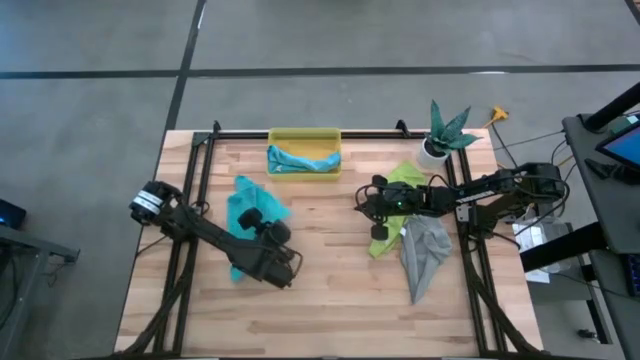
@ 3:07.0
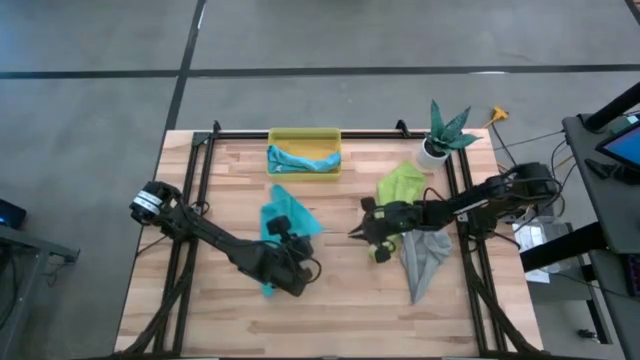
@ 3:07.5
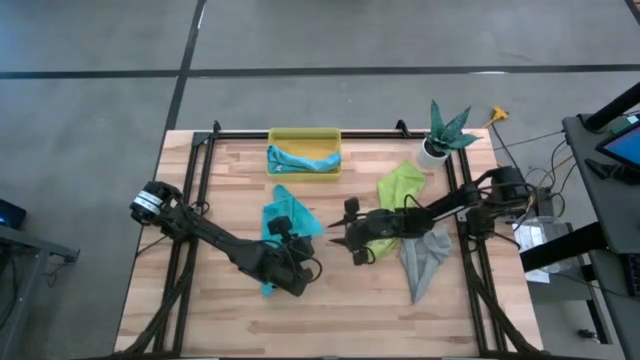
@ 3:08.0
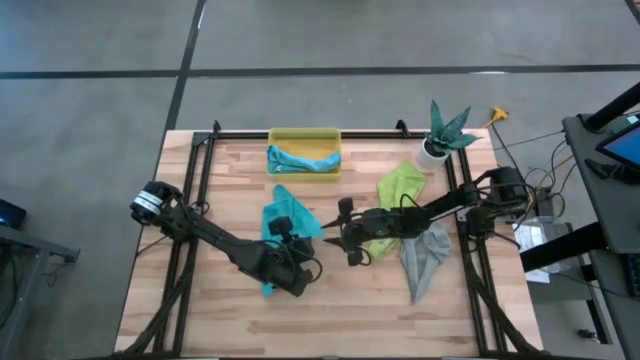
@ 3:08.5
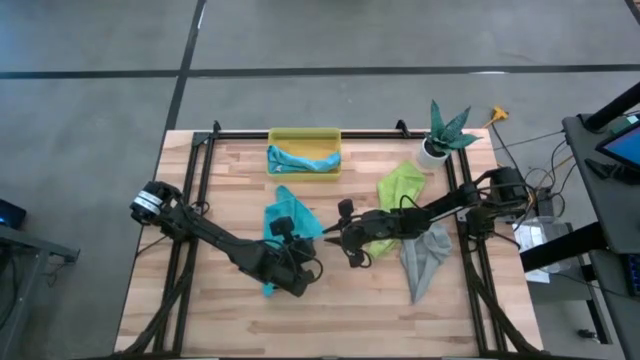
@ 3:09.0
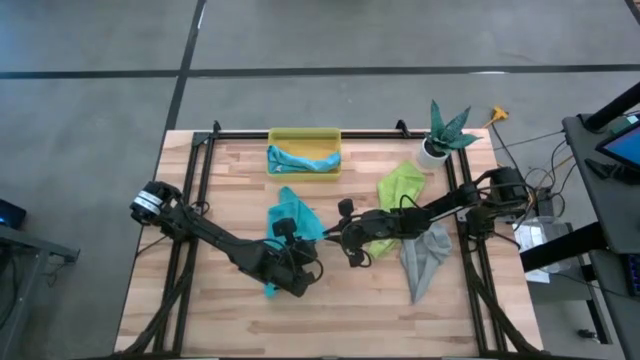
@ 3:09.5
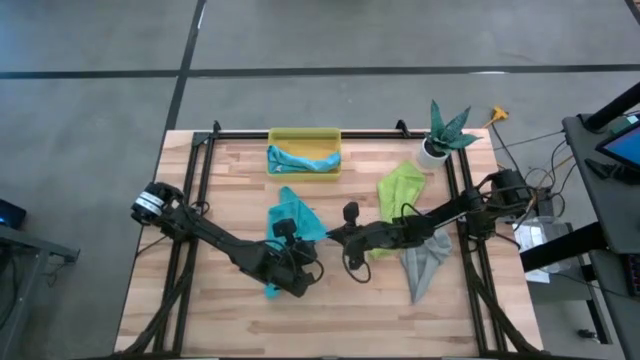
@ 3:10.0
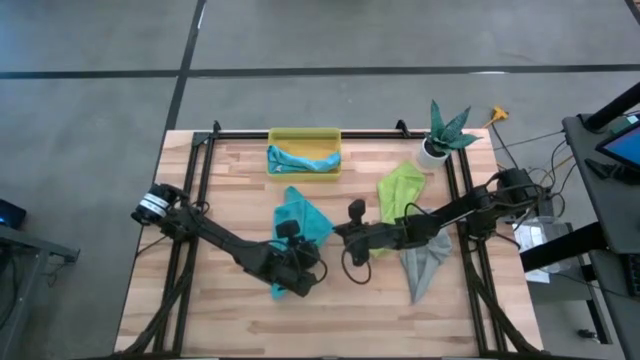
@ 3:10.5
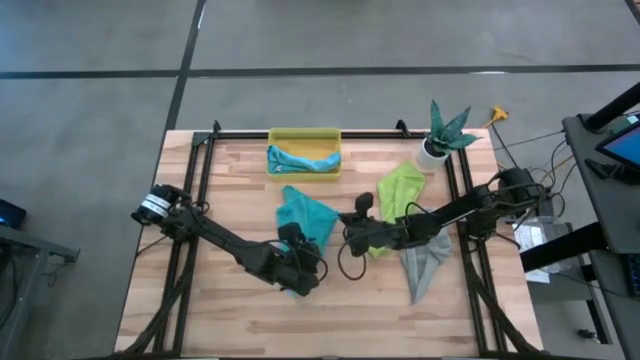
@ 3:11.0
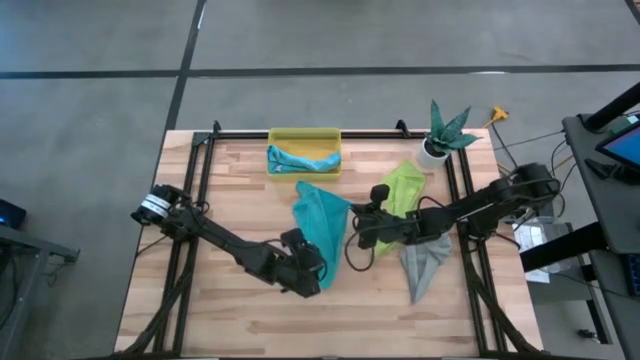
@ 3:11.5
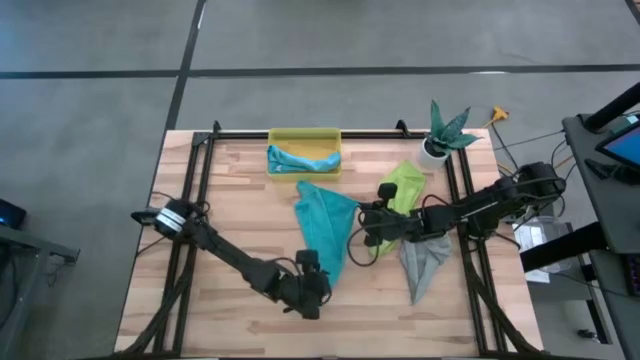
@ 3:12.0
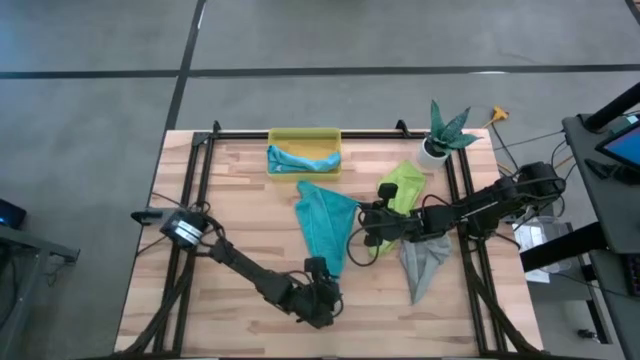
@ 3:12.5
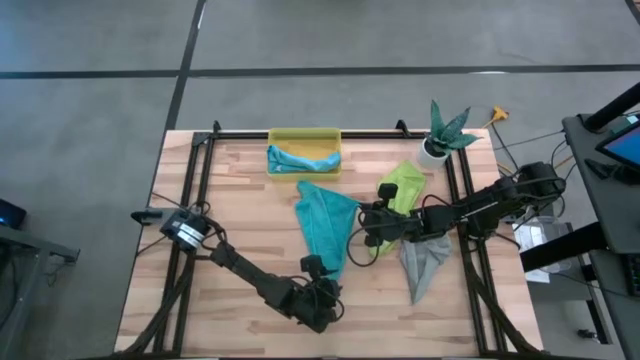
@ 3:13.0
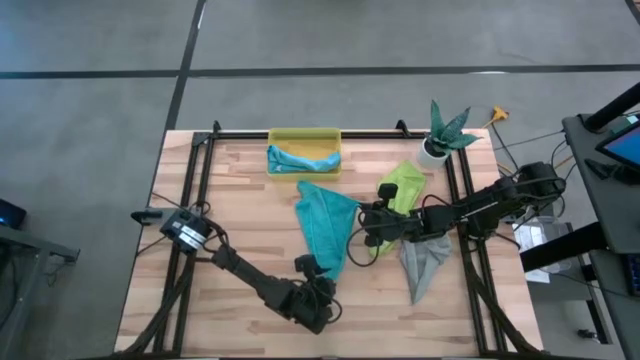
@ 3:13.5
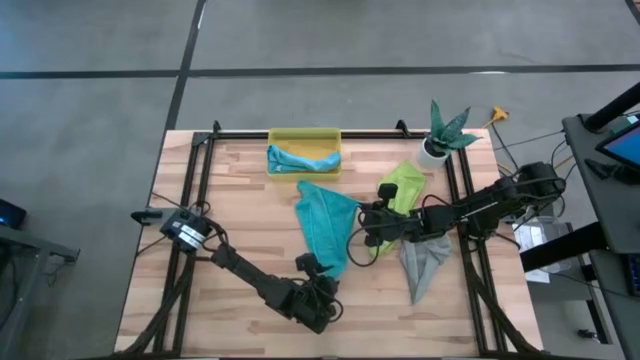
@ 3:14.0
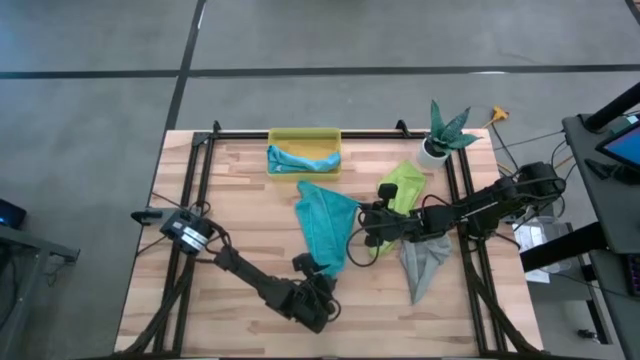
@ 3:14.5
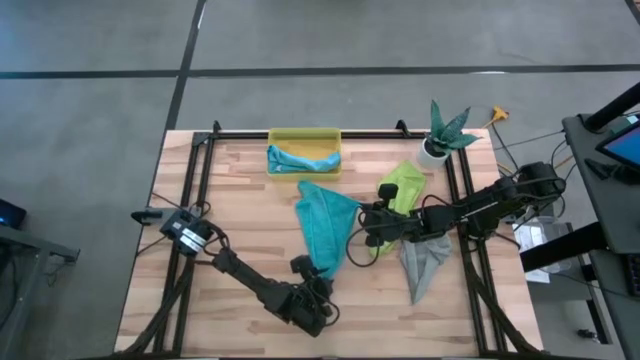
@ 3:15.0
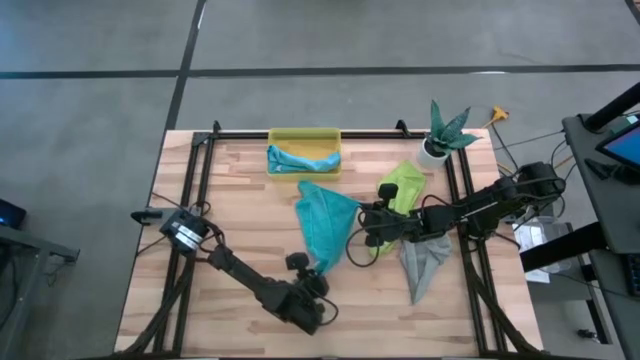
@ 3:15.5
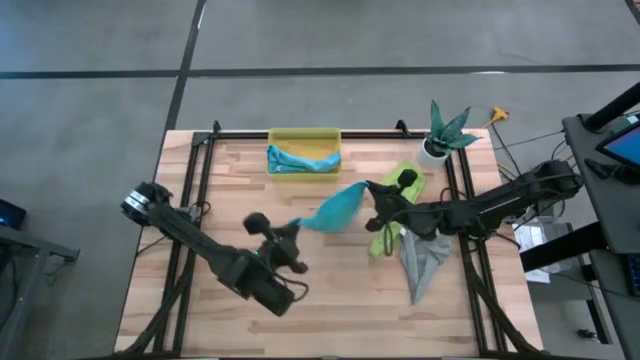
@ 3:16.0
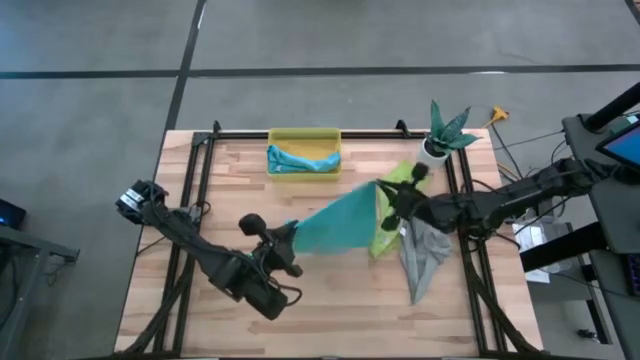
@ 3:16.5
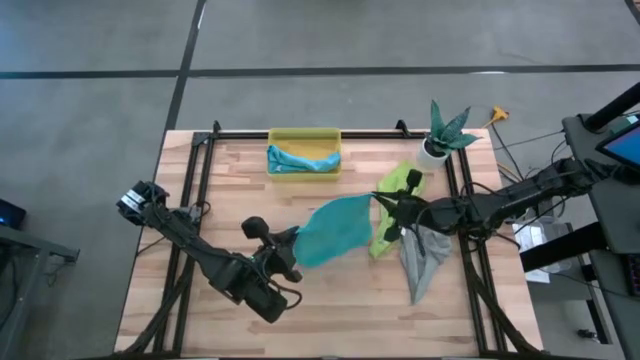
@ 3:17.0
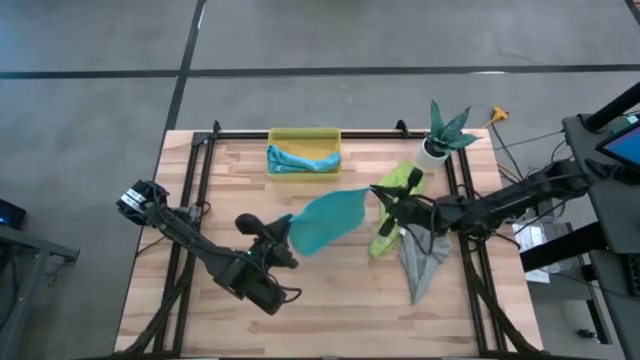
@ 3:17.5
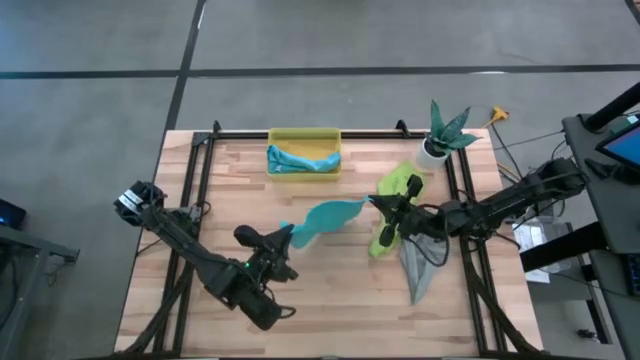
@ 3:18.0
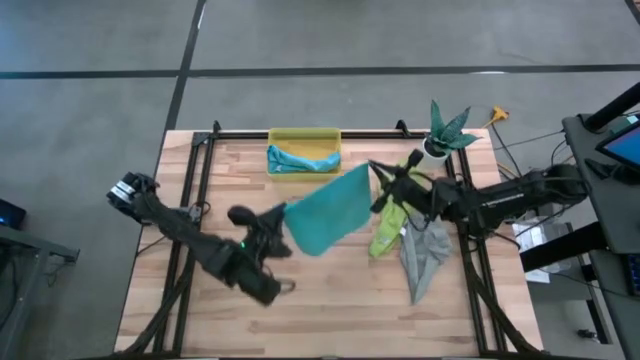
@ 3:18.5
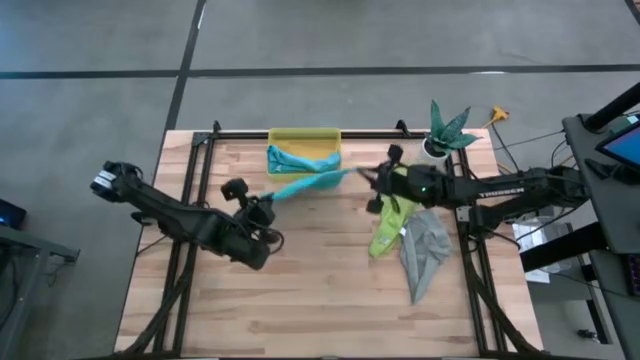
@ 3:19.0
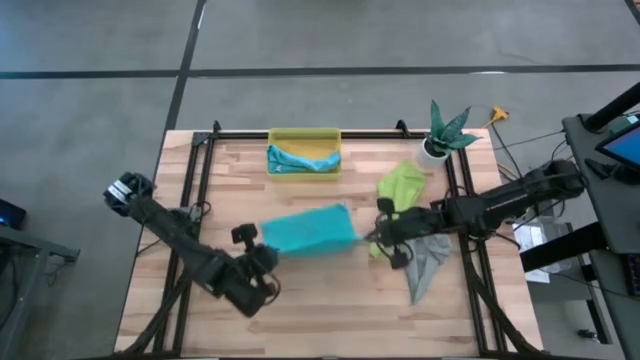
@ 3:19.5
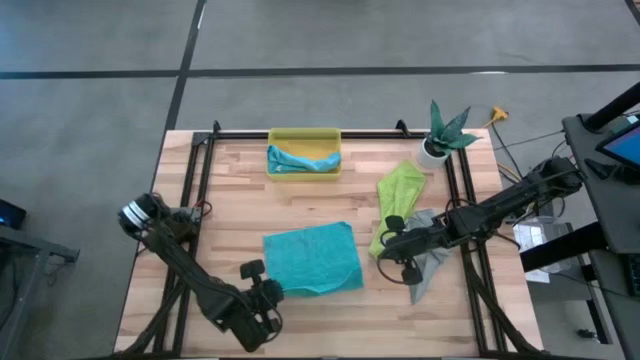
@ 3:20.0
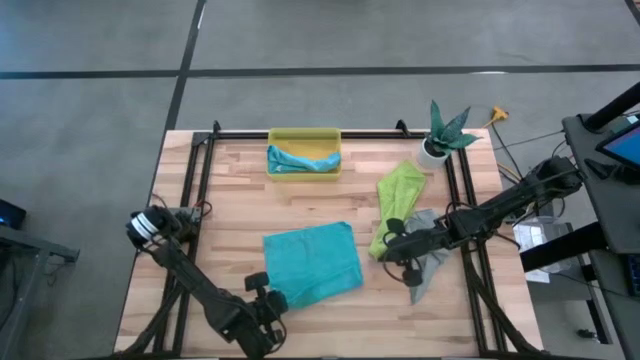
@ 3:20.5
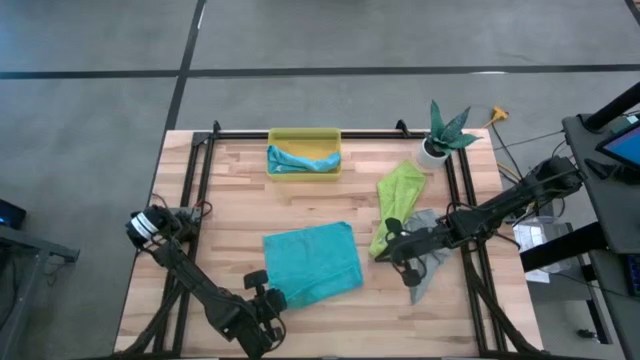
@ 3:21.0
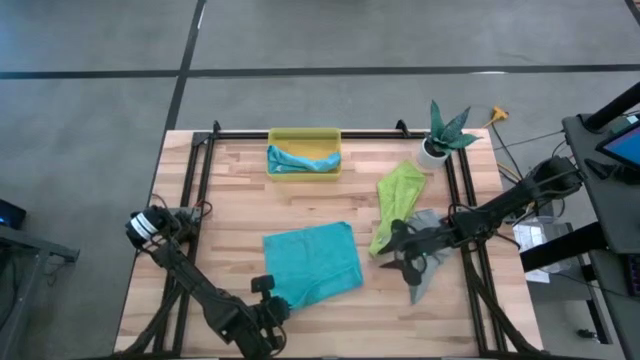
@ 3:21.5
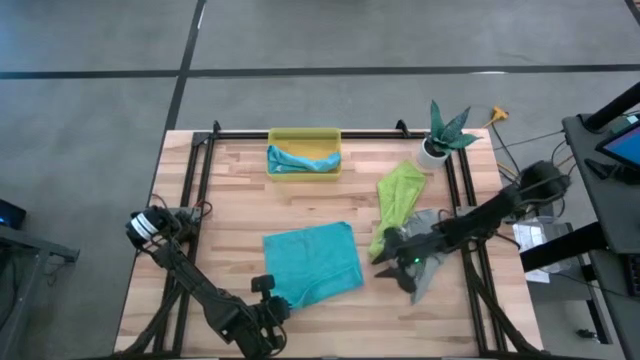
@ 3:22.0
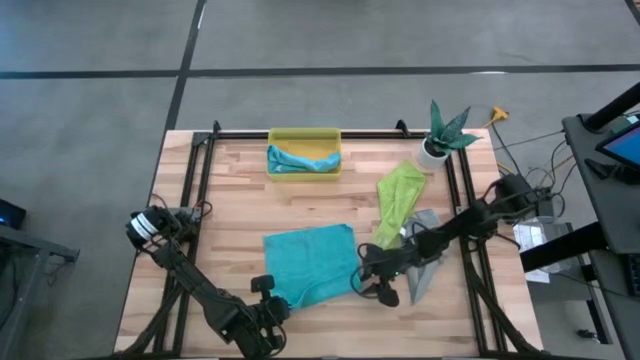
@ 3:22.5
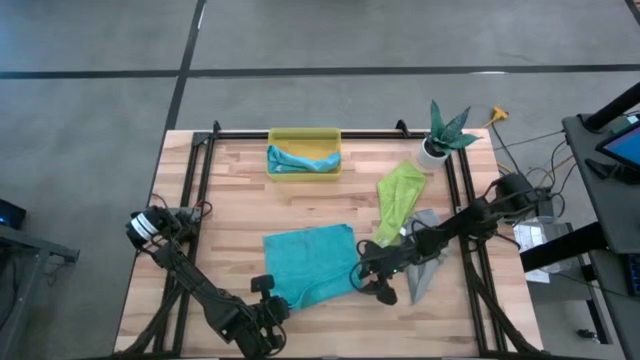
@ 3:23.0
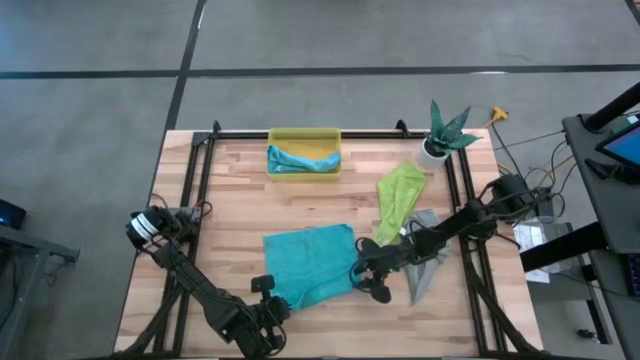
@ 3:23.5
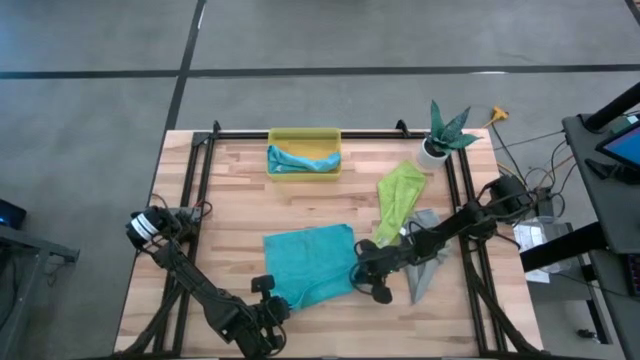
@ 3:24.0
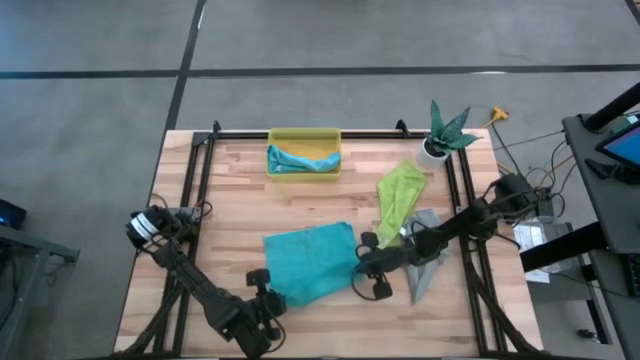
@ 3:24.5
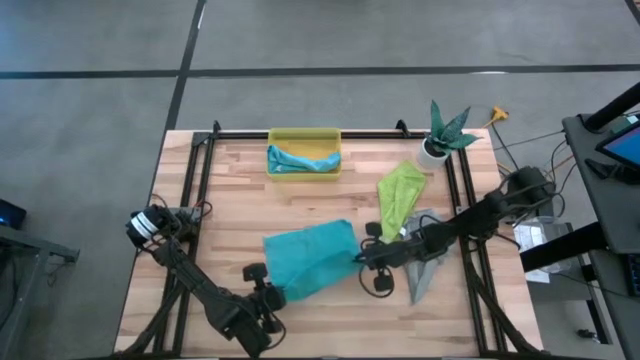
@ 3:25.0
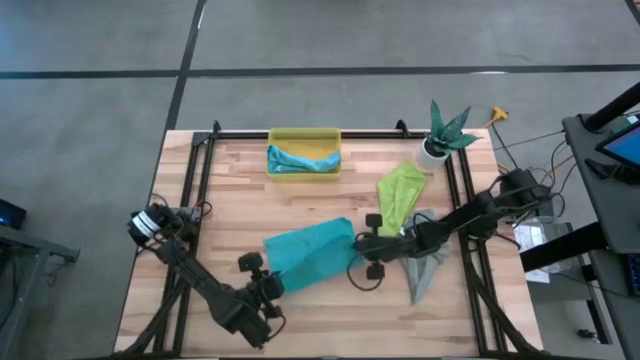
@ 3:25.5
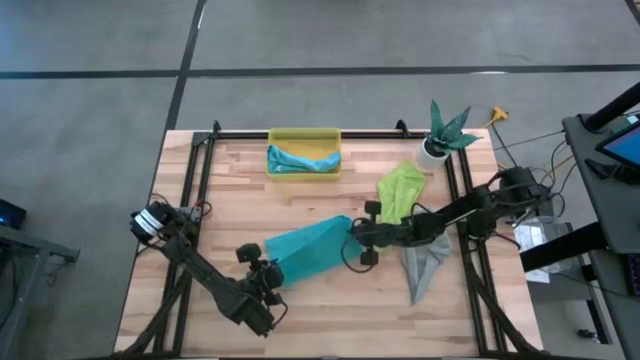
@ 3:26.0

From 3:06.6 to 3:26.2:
Task: Roll microfiber towels into tight, uniform cylinder then place into a basket
Roll the light blue towel
